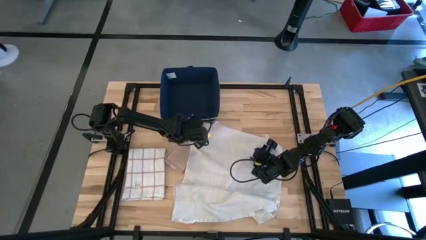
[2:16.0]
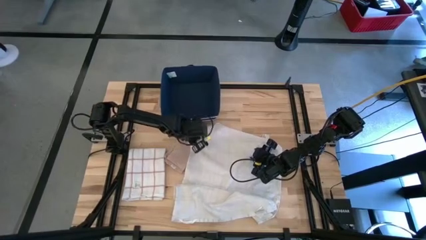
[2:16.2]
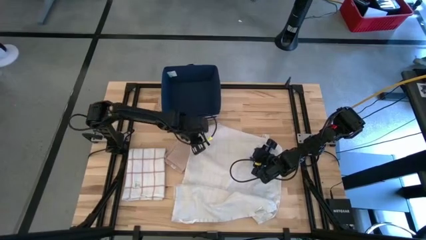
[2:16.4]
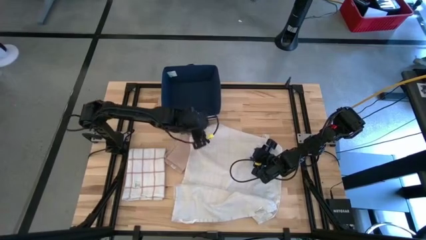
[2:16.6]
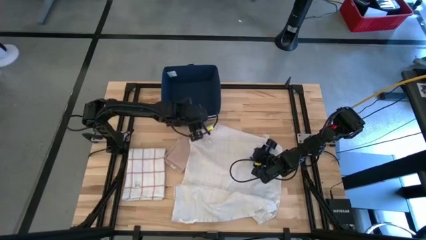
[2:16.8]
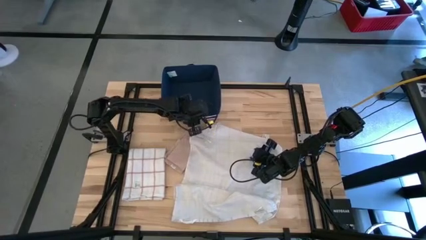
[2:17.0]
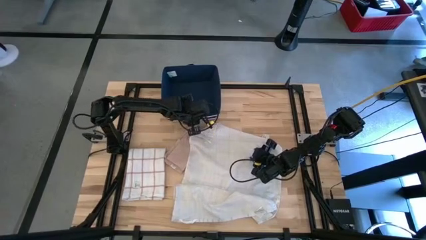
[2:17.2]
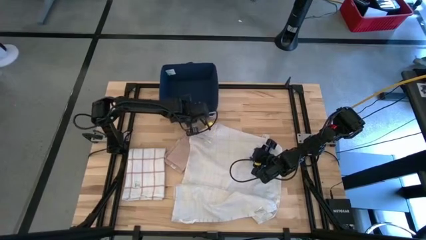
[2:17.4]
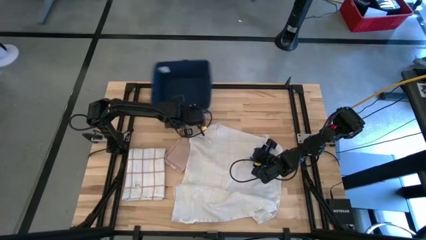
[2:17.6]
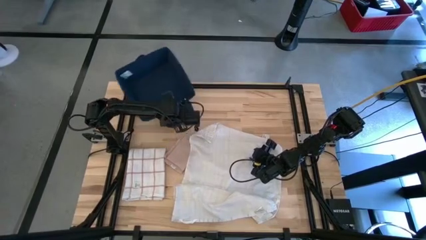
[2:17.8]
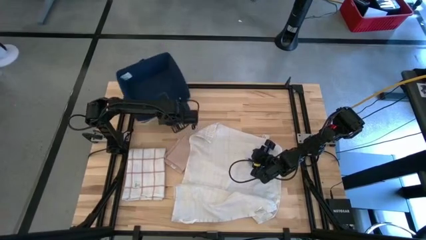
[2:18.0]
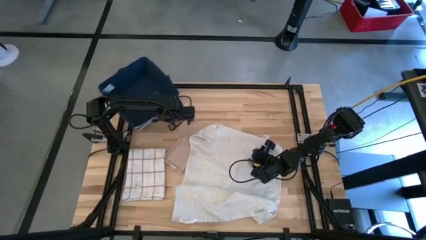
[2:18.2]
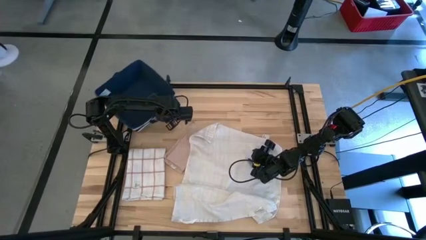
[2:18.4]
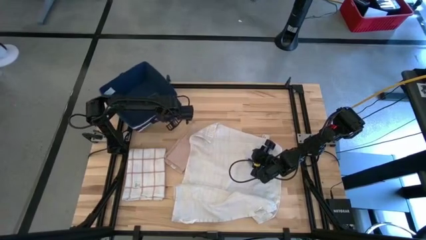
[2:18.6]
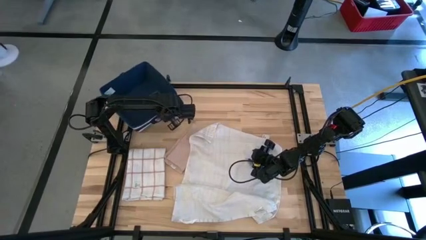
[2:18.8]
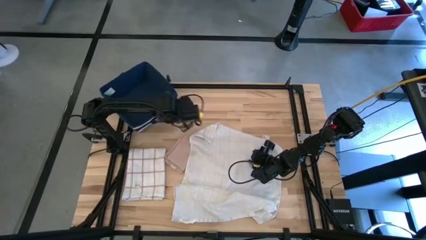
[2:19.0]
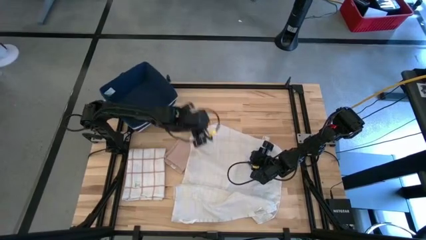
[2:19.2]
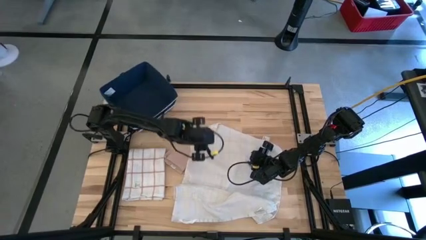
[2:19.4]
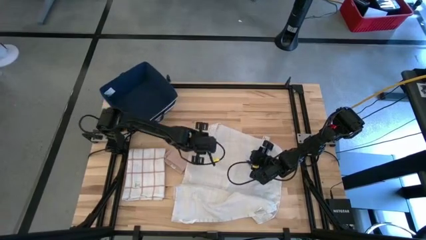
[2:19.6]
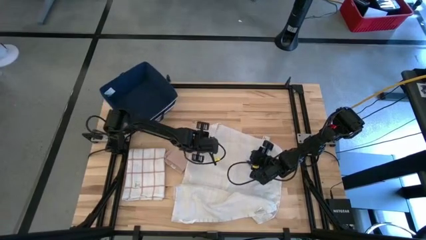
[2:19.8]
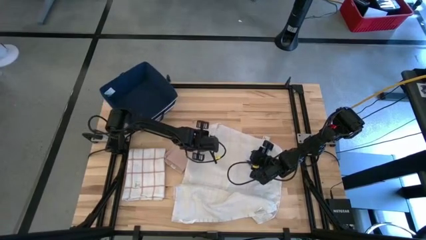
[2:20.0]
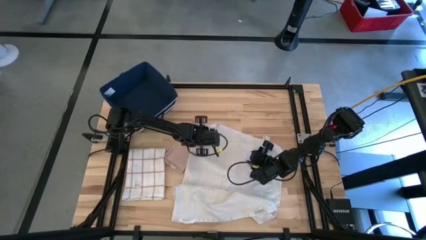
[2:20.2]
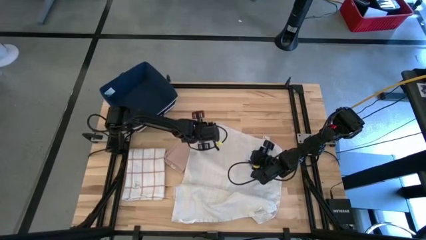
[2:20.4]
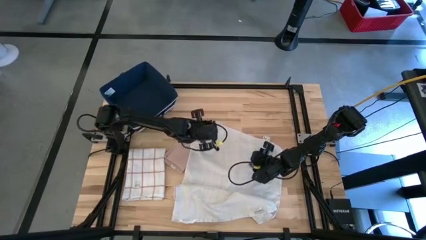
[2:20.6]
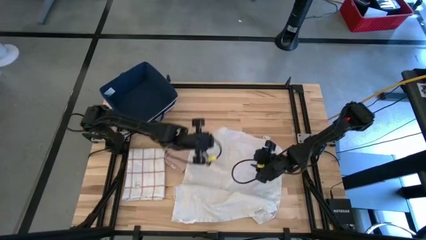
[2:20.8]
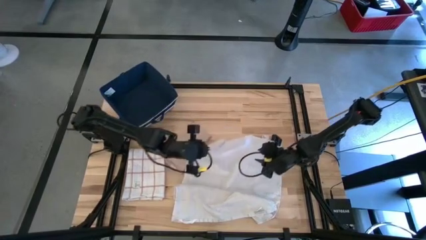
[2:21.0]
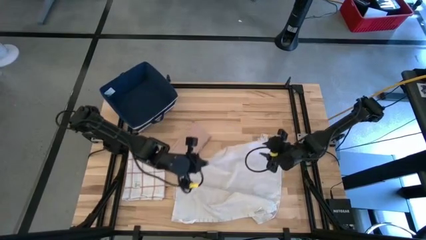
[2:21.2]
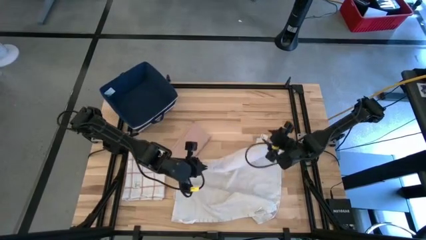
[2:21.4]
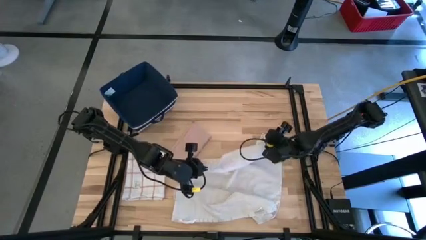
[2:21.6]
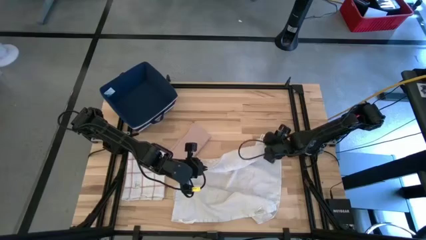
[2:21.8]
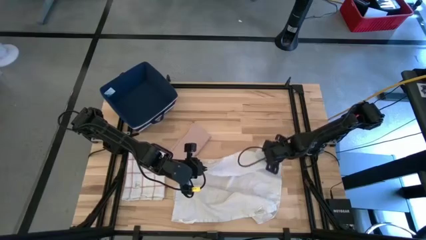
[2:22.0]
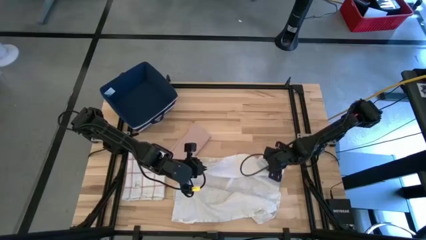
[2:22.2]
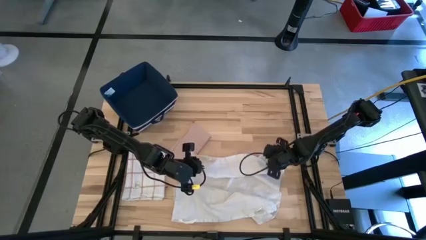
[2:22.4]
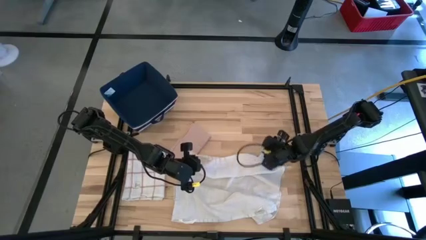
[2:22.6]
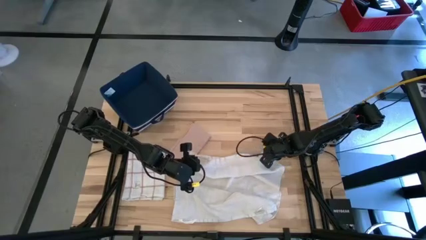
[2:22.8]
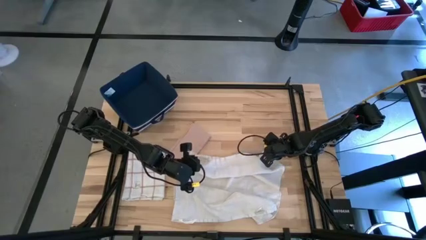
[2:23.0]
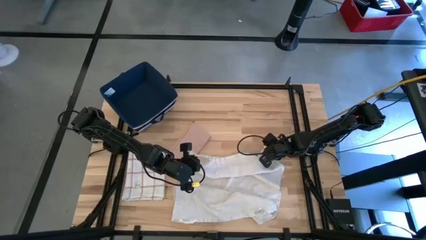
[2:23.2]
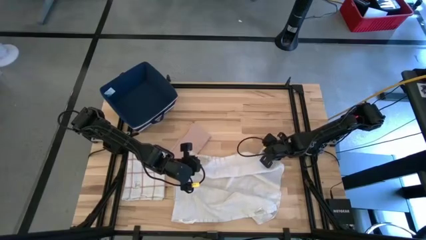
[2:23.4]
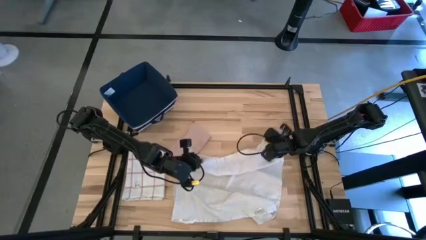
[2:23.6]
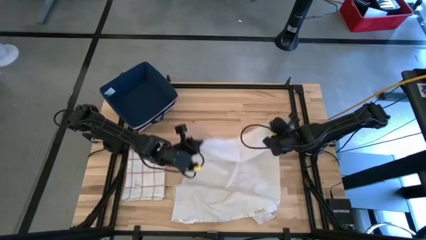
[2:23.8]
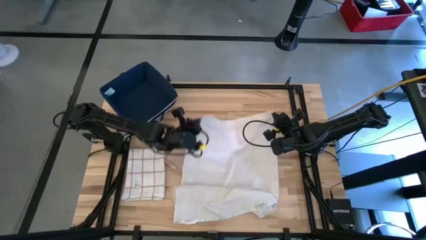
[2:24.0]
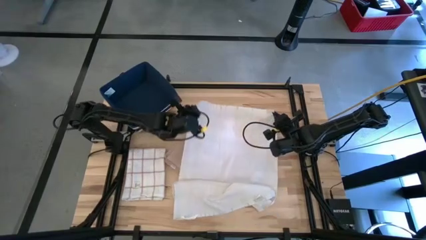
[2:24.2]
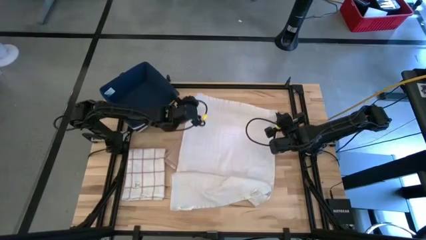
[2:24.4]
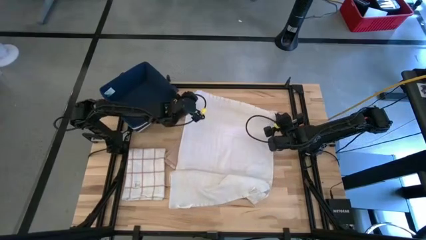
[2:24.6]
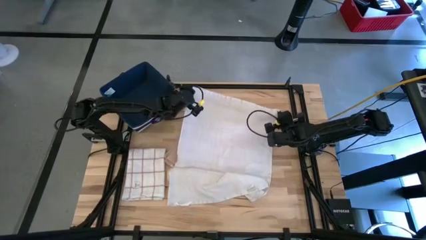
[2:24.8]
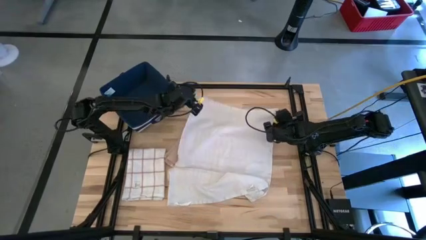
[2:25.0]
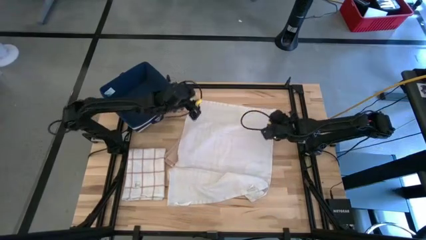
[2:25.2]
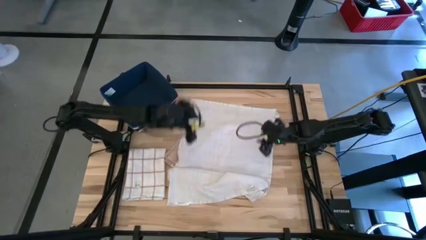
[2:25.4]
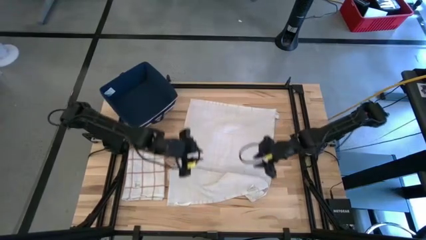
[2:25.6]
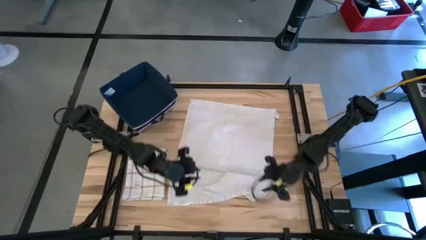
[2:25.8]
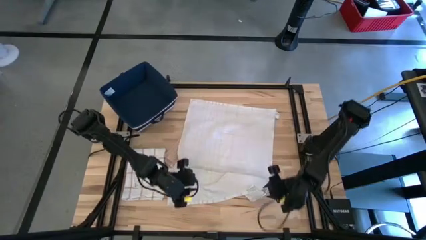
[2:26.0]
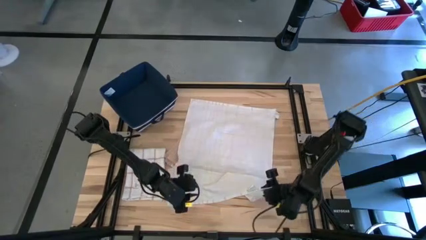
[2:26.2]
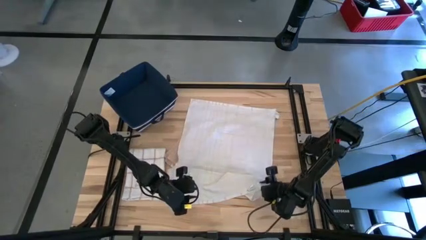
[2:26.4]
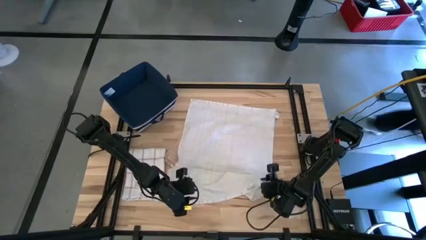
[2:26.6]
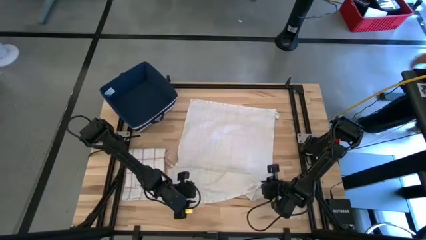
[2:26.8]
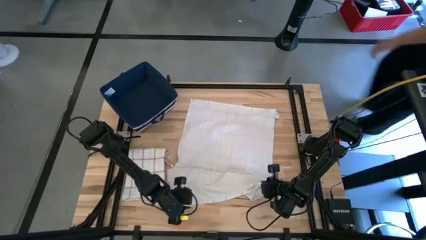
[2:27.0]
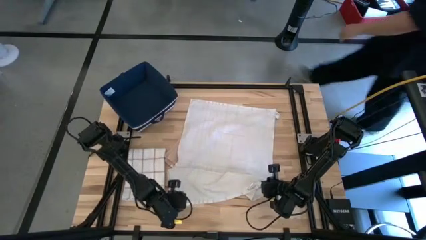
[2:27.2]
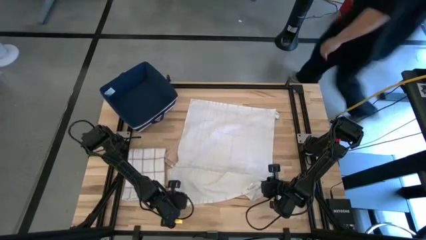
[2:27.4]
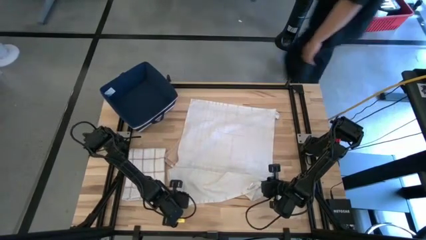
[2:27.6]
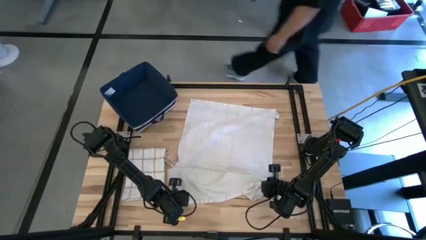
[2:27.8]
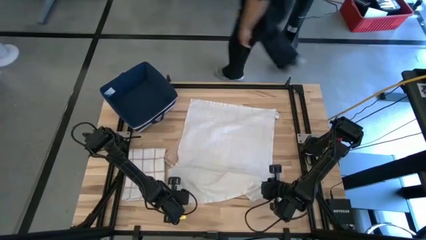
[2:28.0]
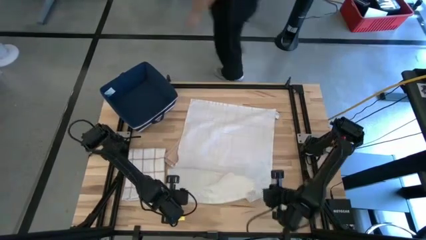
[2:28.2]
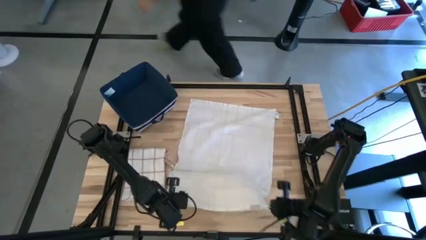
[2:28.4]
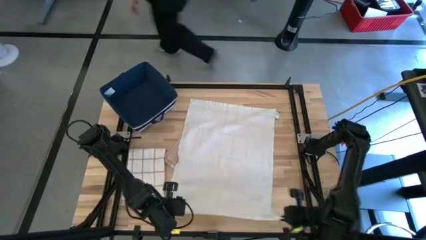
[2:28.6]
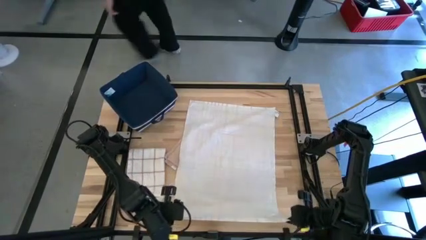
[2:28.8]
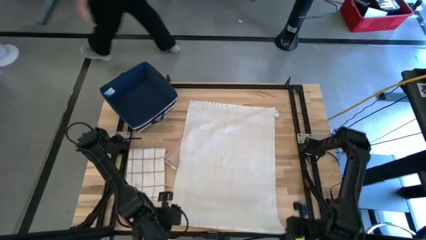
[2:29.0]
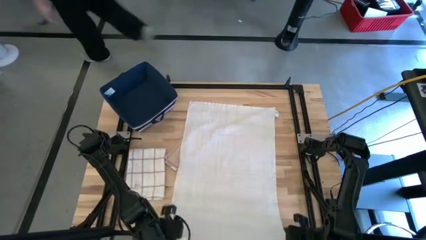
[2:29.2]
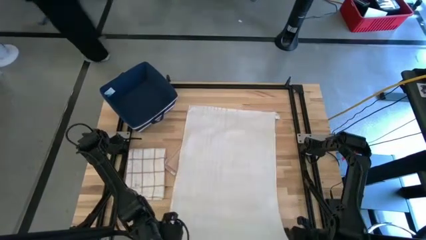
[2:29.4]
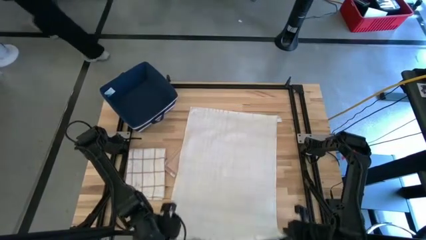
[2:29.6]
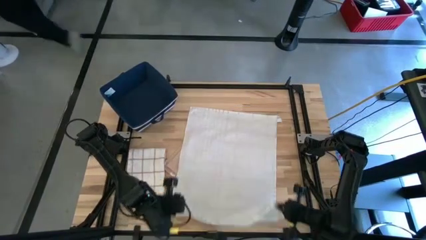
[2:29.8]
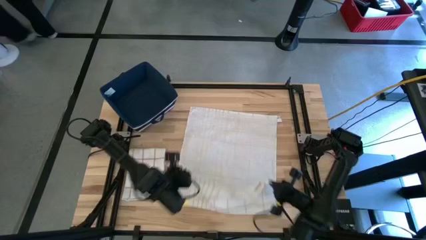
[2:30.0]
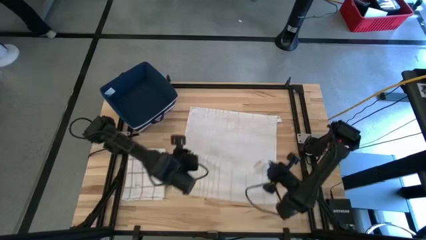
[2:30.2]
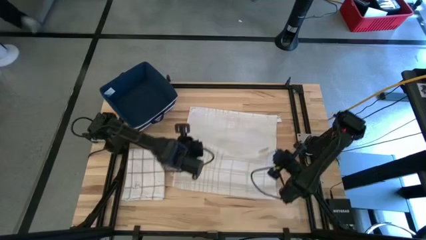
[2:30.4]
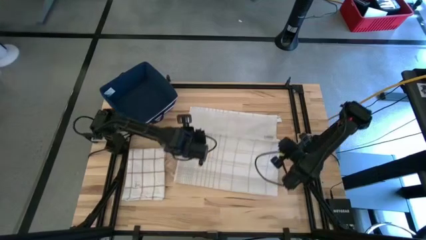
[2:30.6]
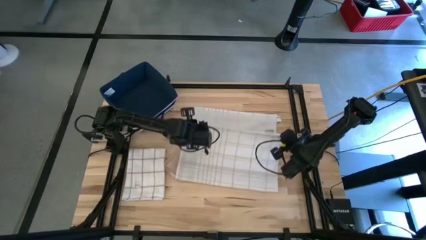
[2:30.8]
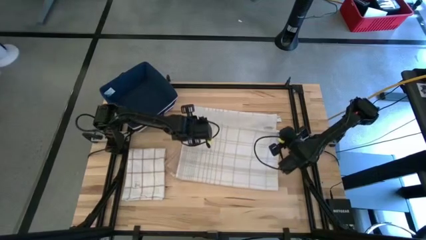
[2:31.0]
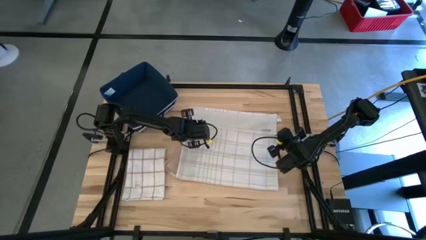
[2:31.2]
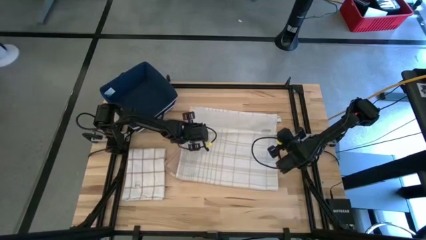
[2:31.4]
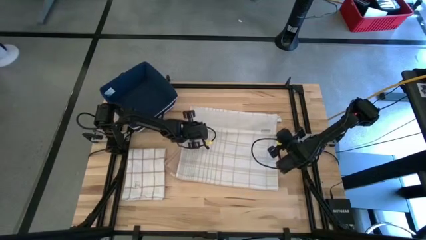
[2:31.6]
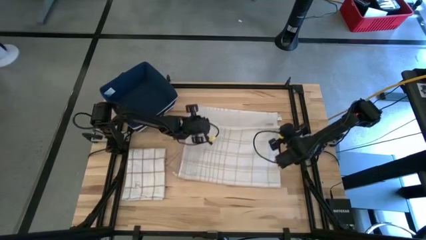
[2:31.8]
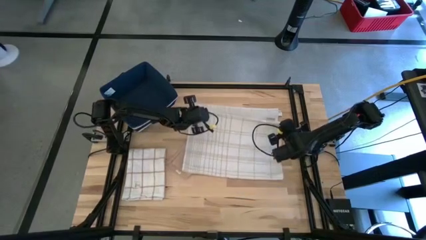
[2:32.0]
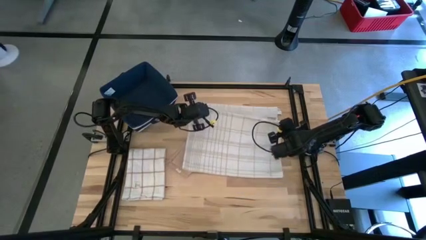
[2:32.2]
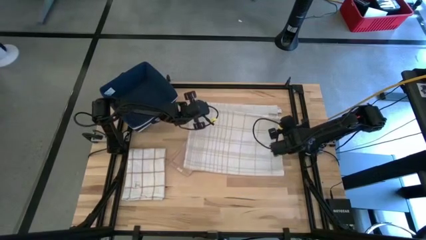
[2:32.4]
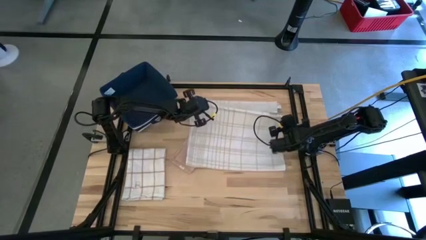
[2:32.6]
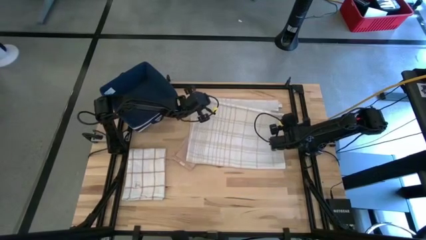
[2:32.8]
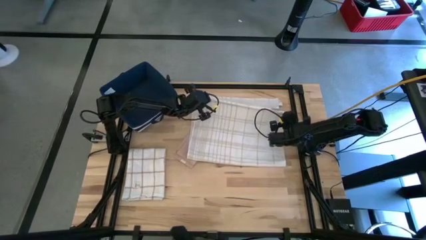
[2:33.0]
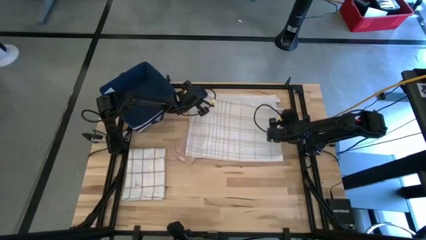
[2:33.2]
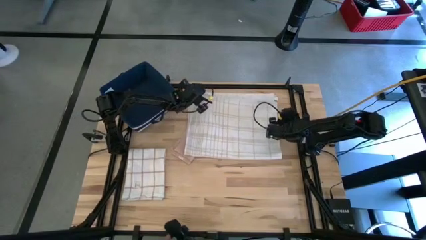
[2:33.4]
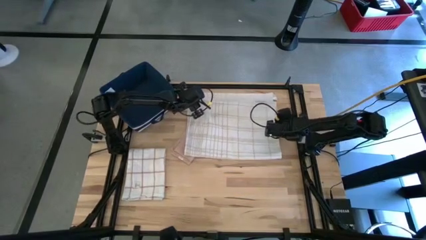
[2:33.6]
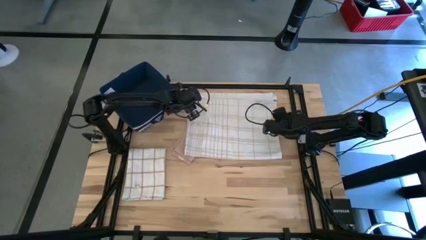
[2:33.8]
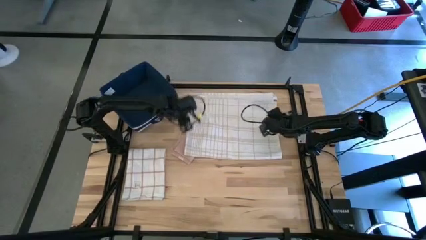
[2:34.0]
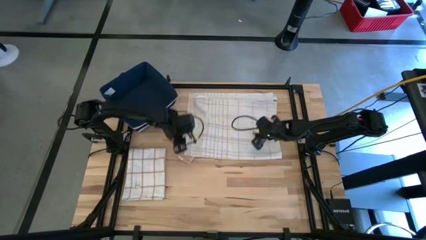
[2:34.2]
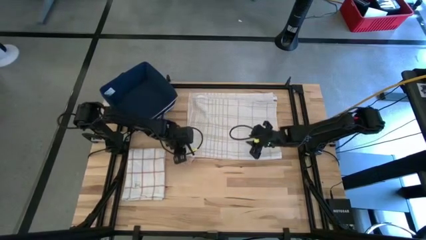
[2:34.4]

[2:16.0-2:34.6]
Task: Fold towel
Fold the right white patterned towel
